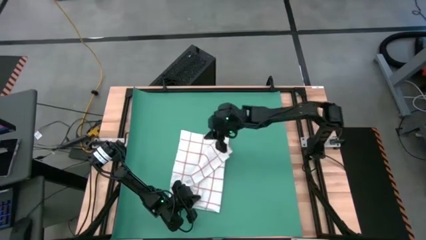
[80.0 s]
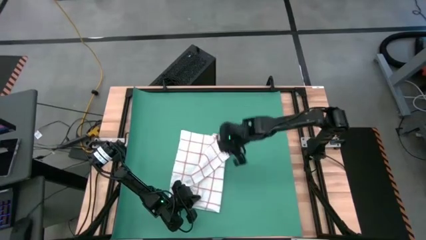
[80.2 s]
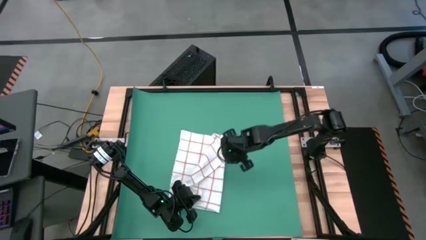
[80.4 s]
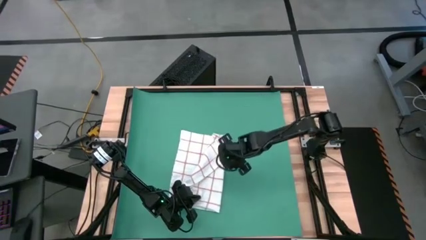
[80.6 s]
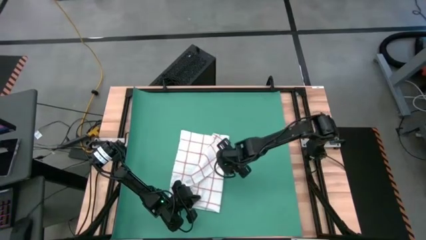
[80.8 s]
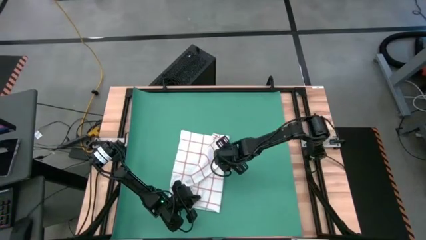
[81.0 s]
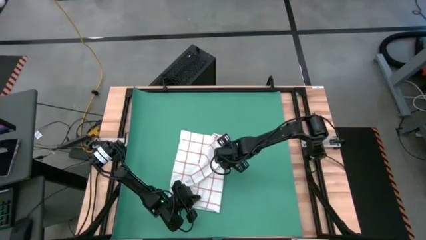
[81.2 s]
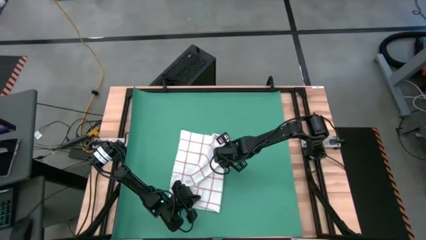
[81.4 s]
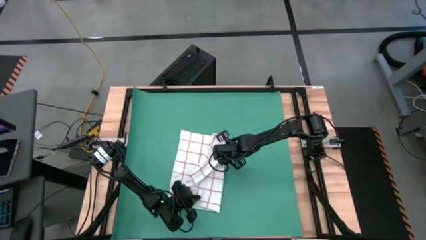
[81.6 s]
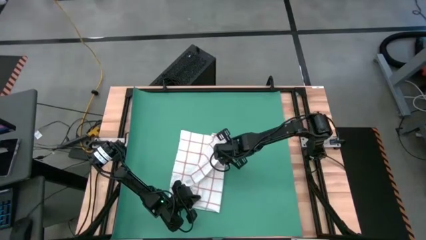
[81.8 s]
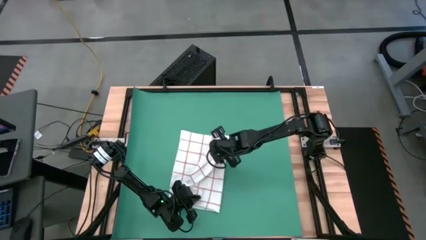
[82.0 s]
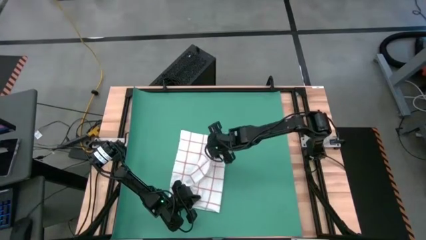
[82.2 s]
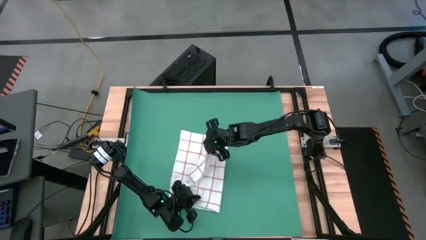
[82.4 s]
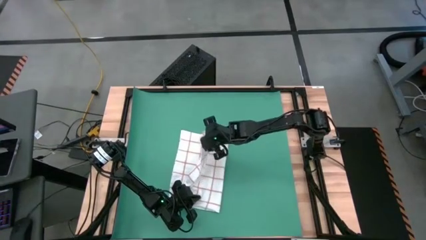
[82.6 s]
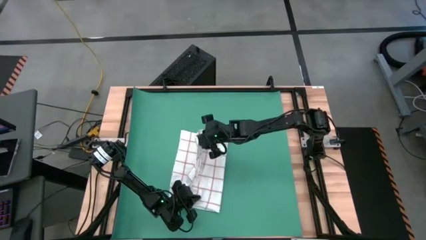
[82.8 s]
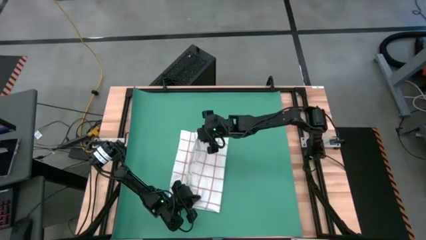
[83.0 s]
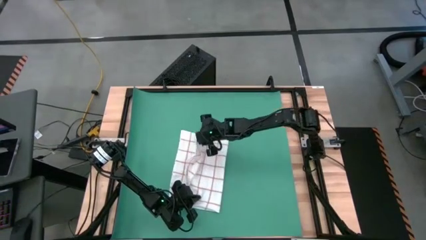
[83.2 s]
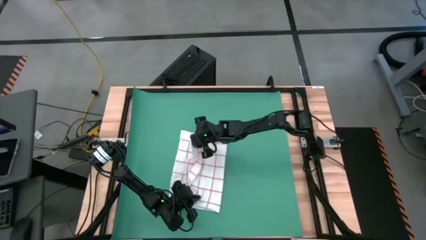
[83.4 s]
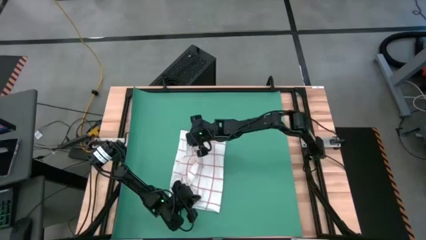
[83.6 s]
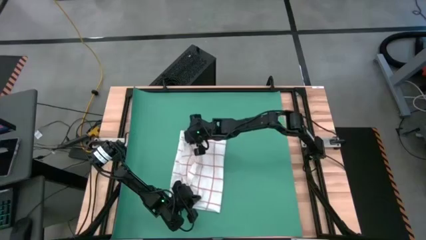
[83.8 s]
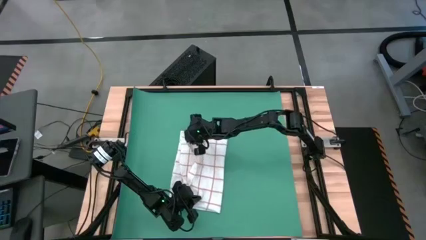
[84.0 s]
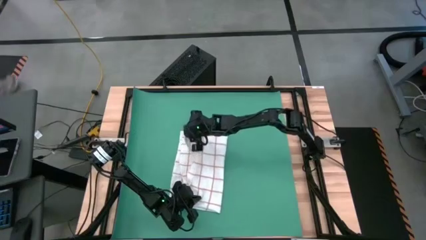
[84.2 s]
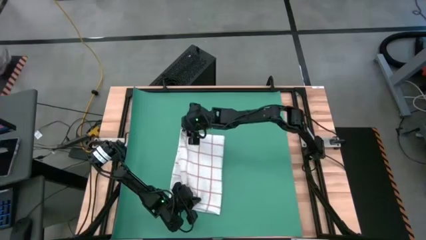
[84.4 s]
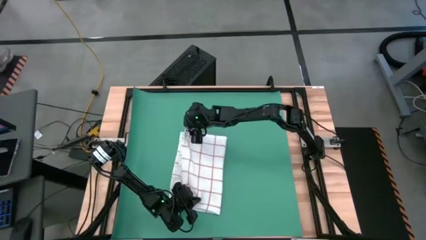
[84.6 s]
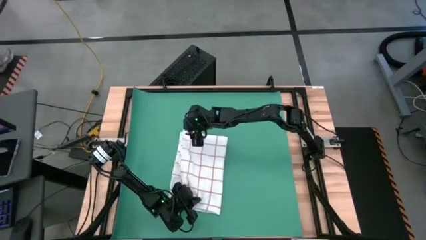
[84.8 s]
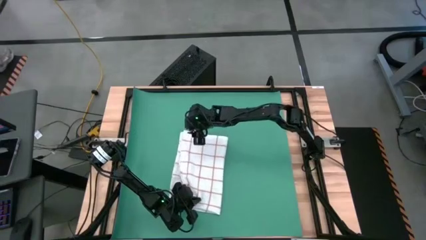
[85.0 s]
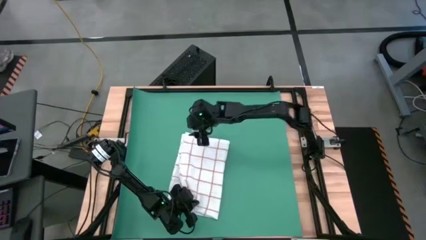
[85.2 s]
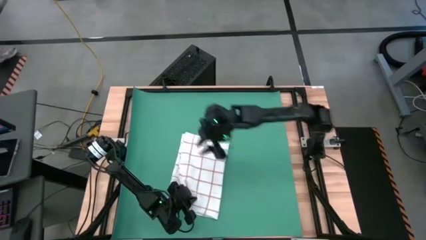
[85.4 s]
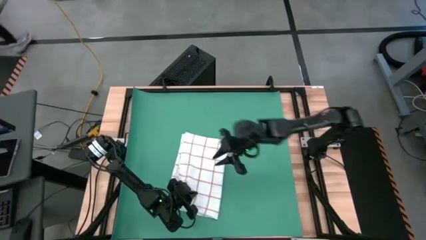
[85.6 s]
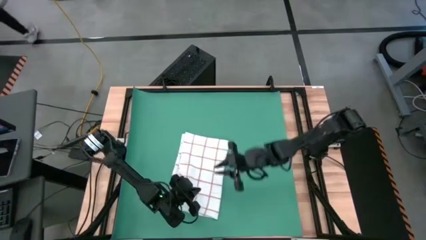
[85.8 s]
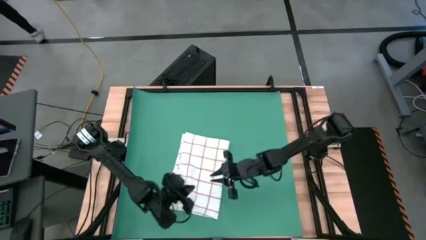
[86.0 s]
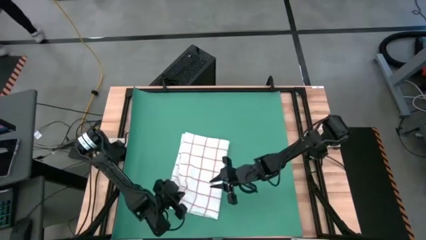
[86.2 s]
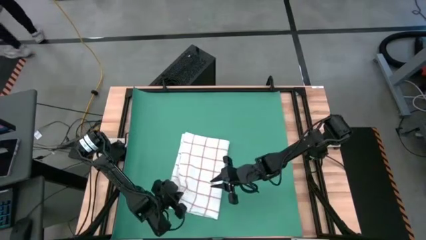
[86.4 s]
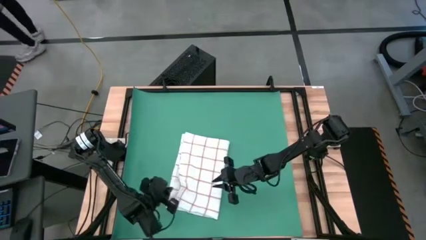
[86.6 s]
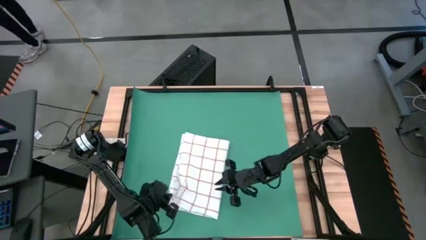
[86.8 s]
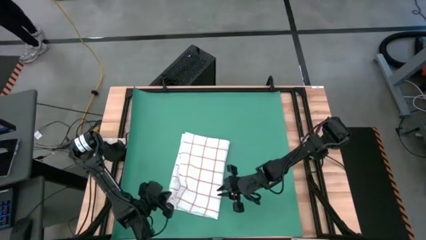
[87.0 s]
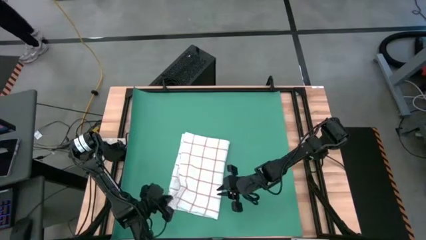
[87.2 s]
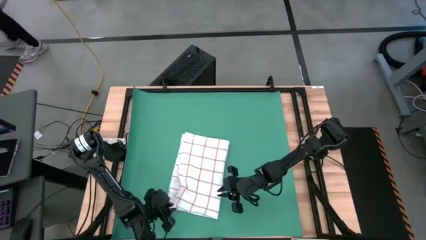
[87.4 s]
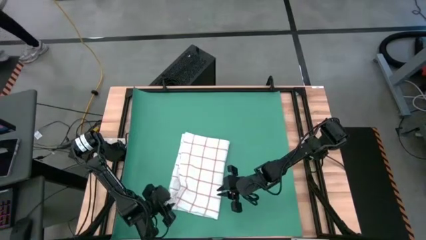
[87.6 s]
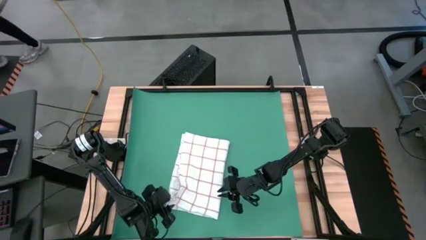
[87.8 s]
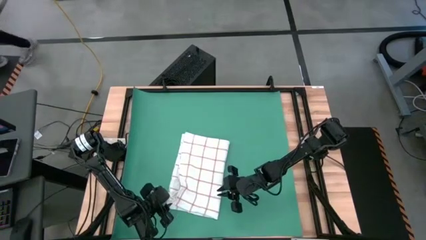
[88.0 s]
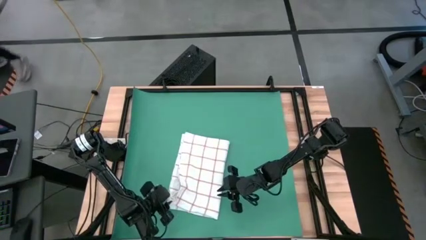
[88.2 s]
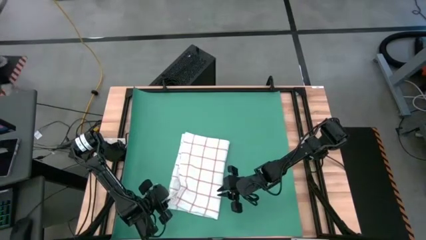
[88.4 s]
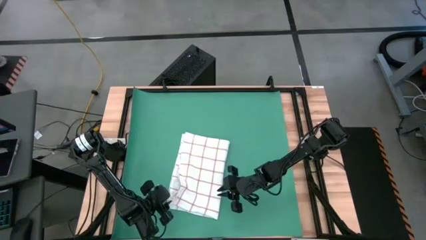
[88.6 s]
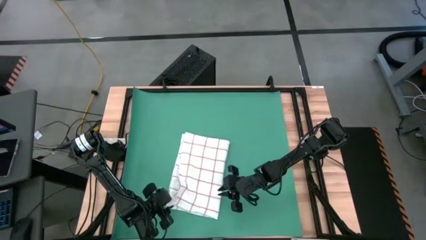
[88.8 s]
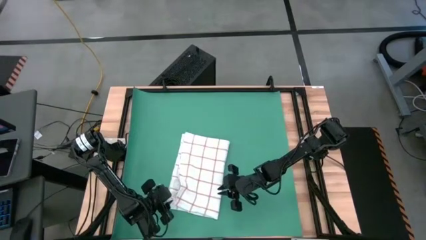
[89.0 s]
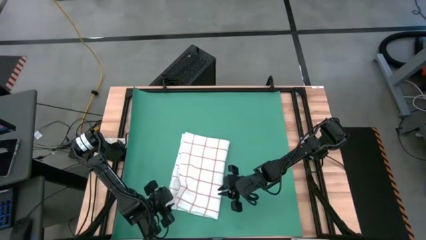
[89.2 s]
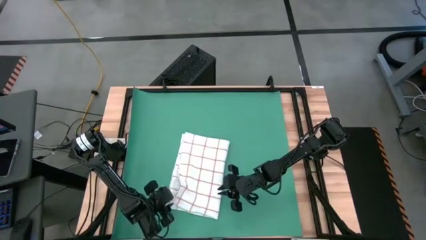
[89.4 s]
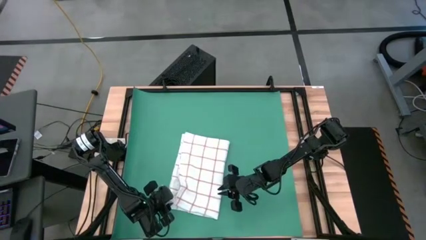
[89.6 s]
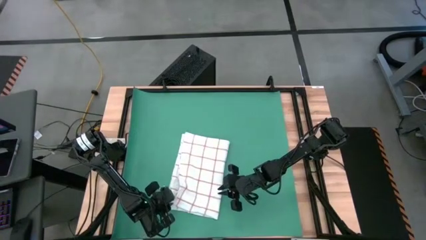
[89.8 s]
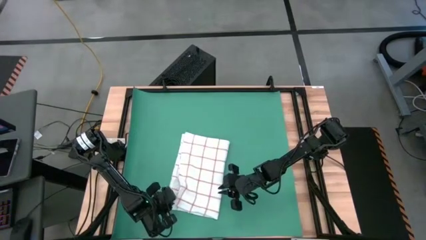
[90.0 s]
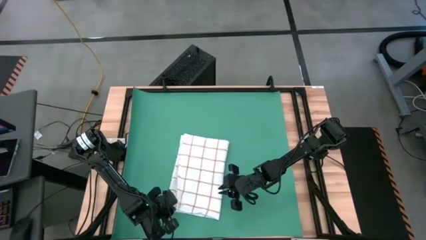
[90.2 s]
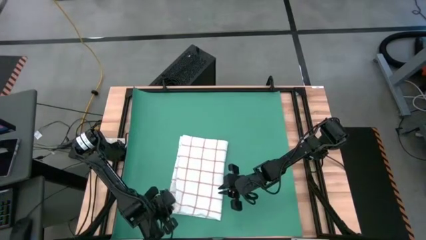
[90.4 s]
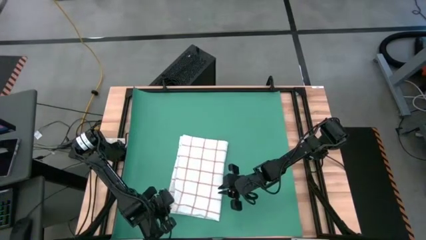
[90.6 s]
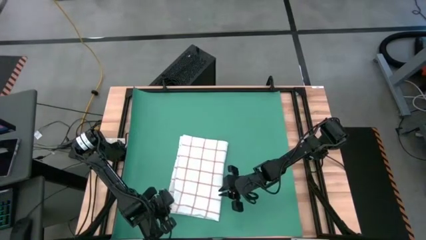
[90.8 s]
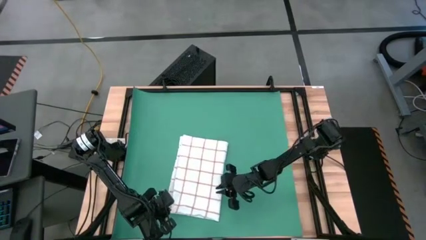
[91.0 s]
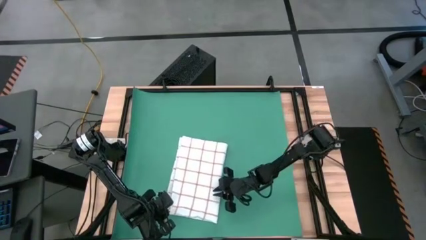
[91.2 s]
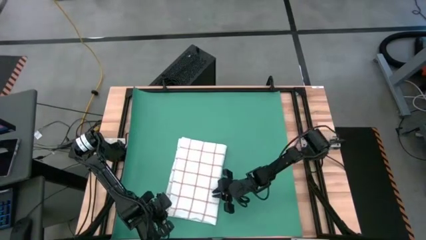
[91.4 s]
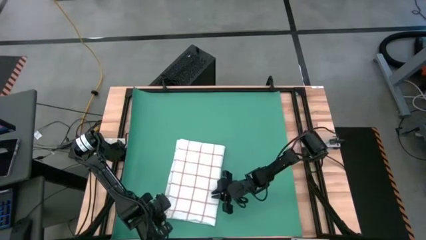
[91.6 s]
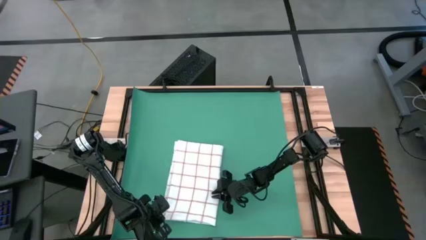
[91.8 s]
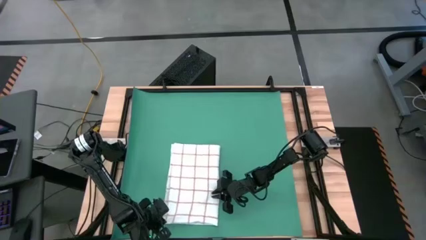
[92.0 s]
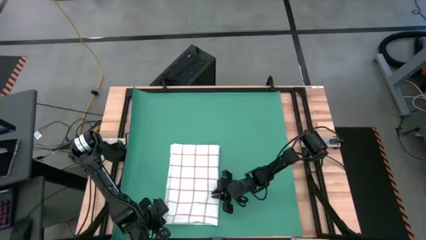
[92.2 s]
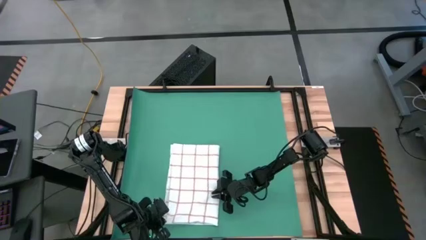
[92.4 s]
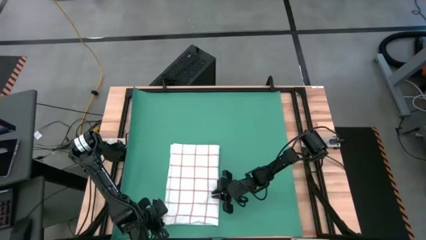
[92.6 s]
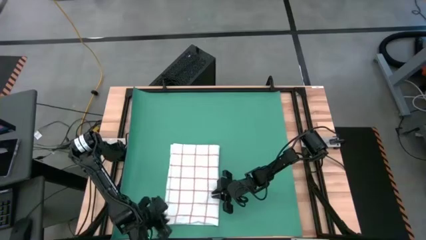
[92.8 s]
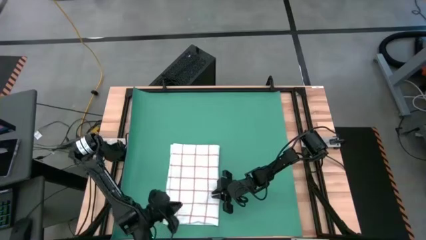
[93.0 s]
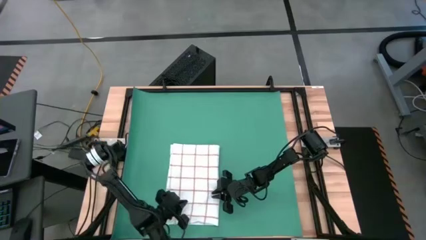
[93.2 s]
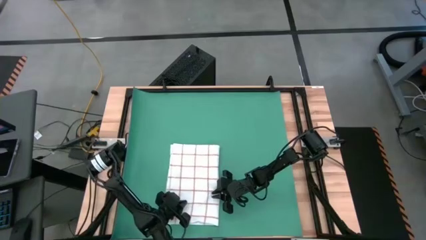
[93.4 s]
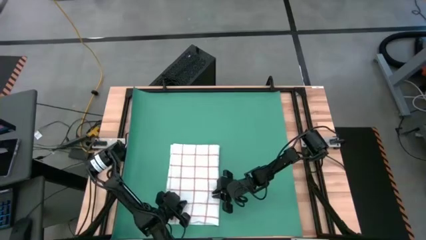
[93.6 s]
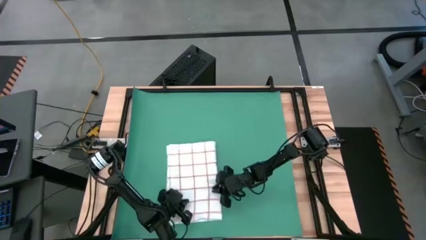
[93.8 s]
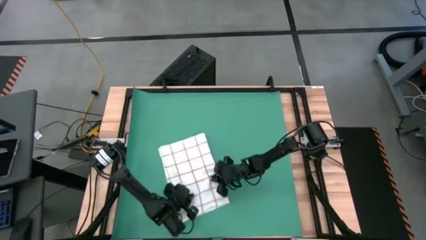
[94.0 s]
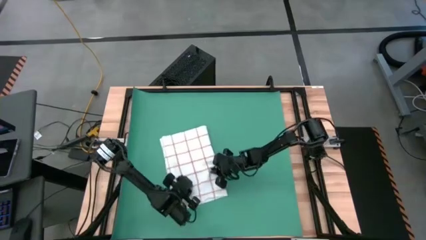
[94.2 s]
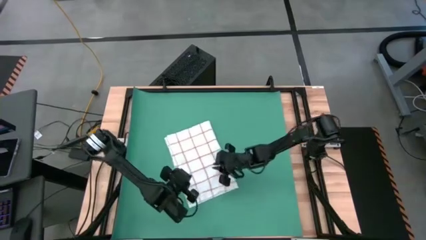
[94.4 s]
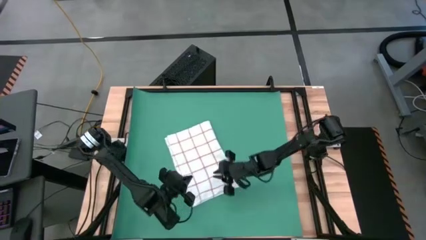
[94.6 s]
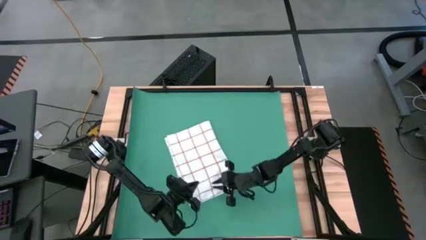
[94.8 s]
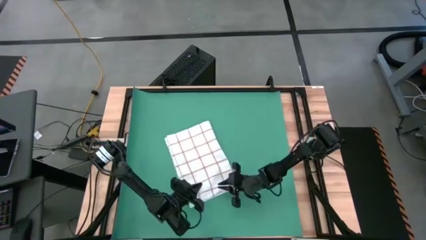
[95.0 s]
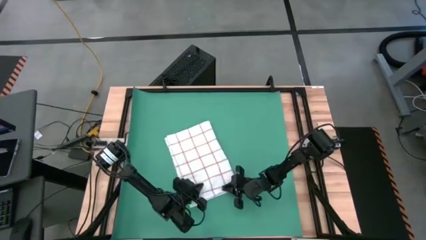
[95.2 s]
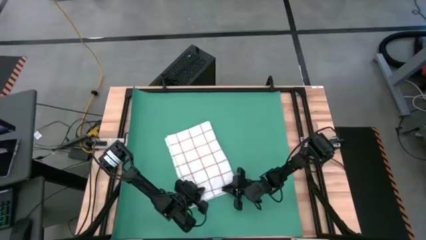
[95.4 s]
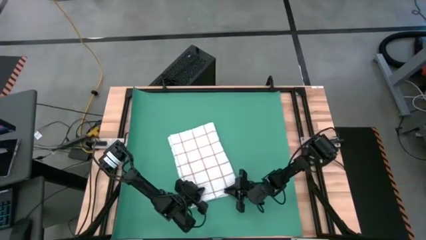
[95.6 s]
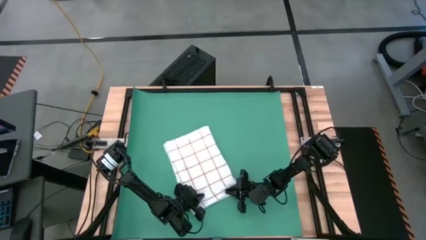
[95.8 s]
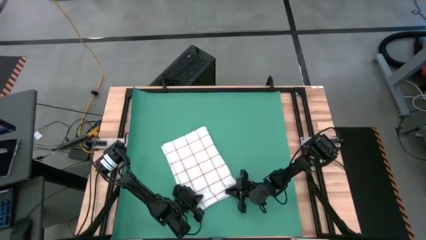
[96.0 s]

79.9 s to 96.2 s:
Task: Roll towel
Roll the white towel
